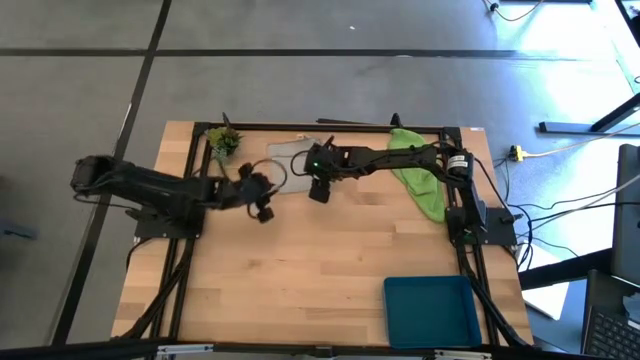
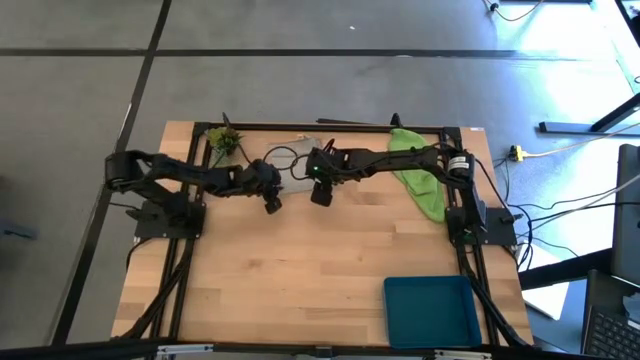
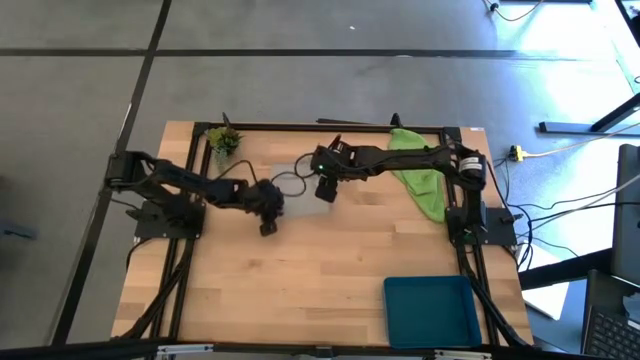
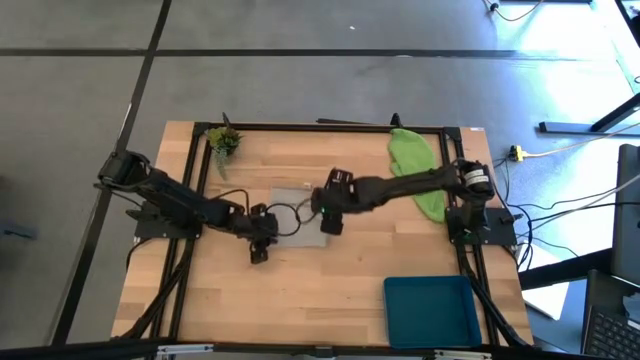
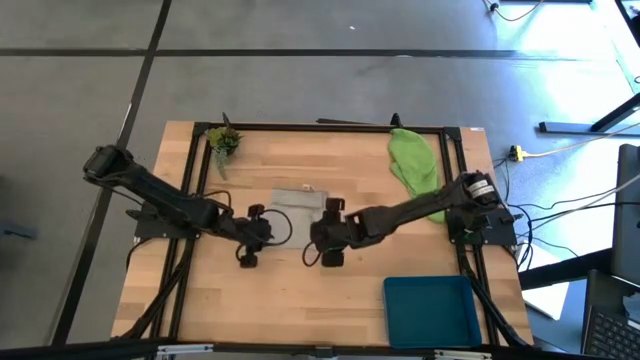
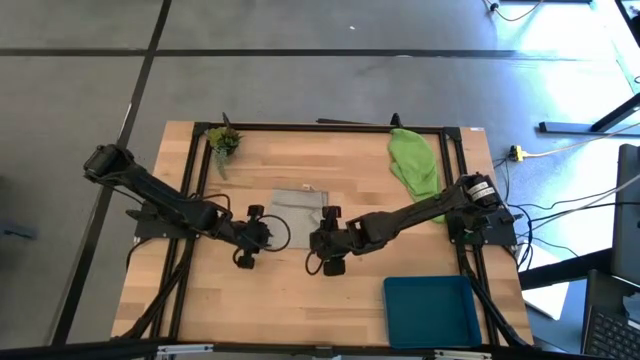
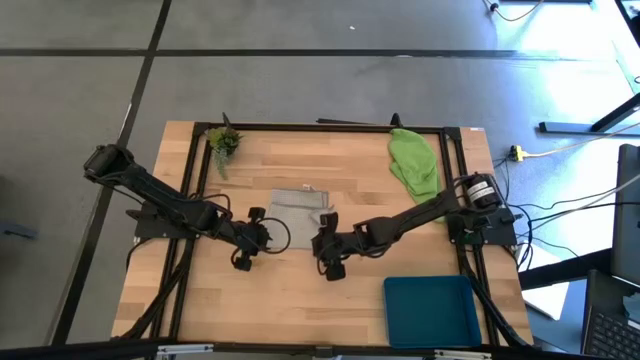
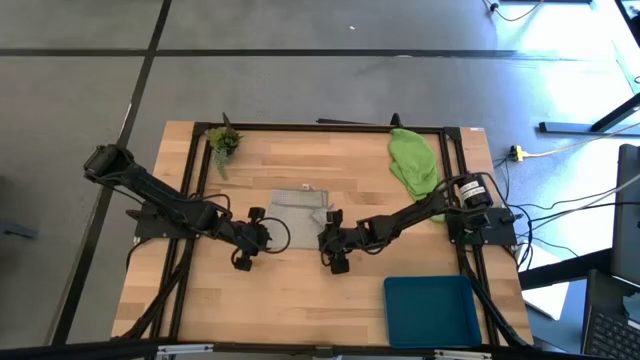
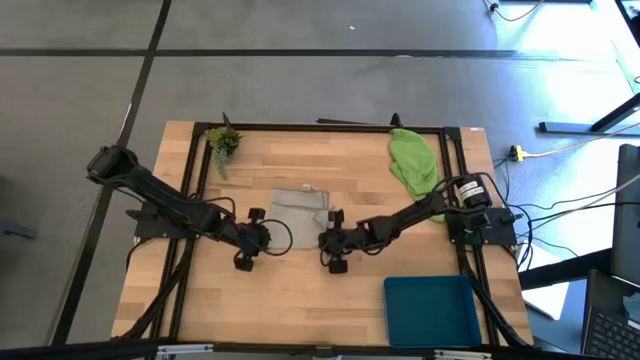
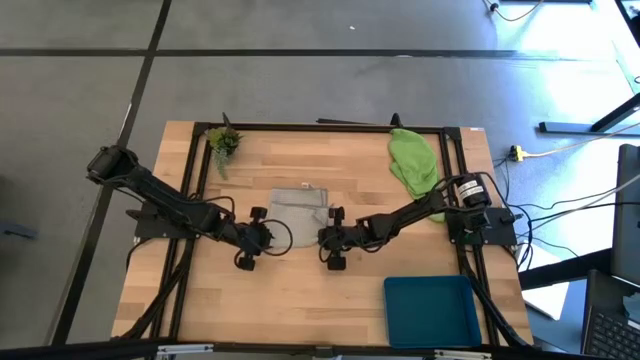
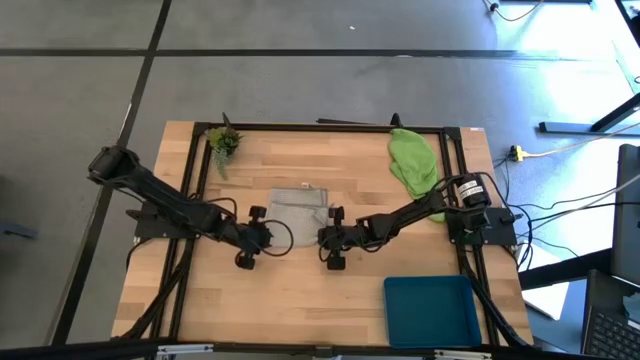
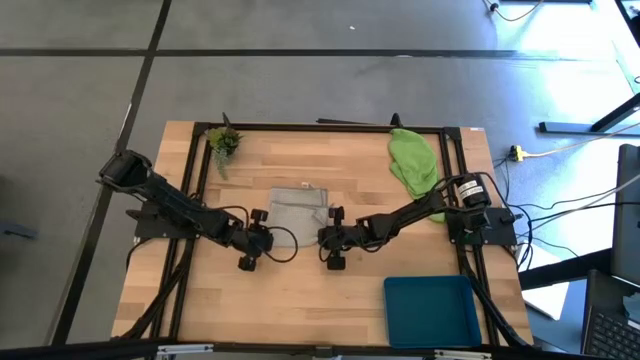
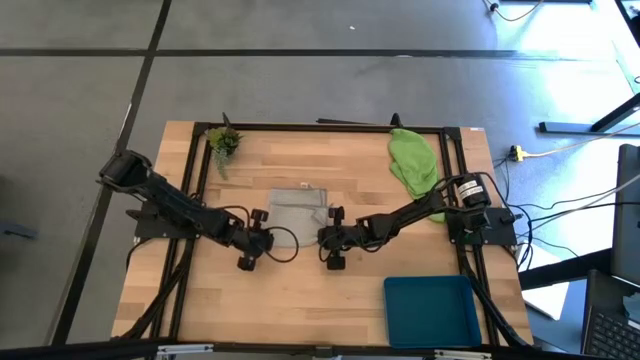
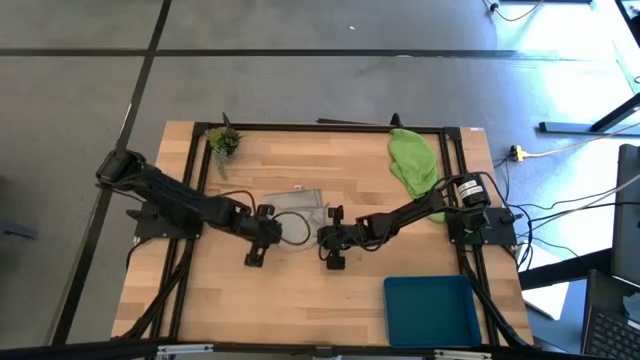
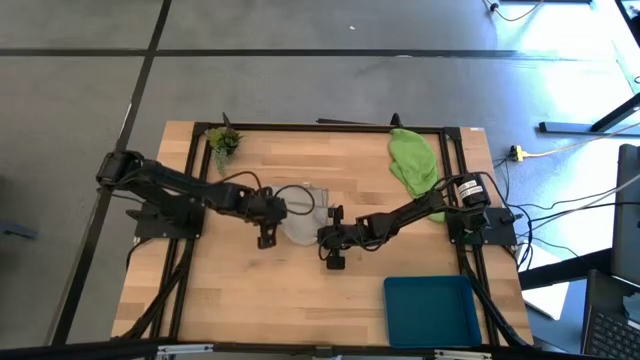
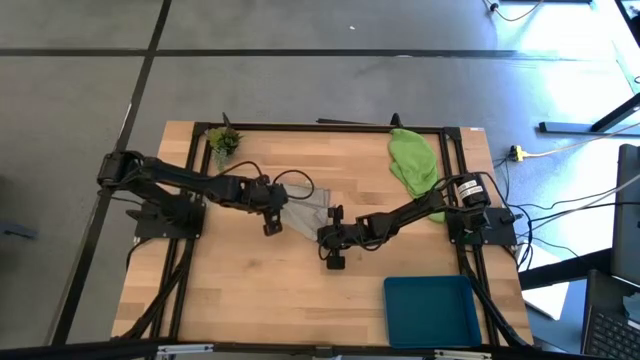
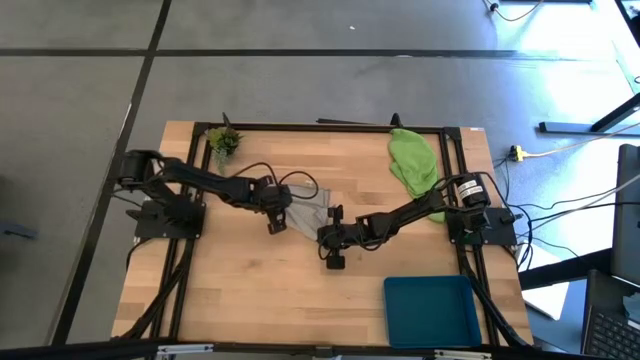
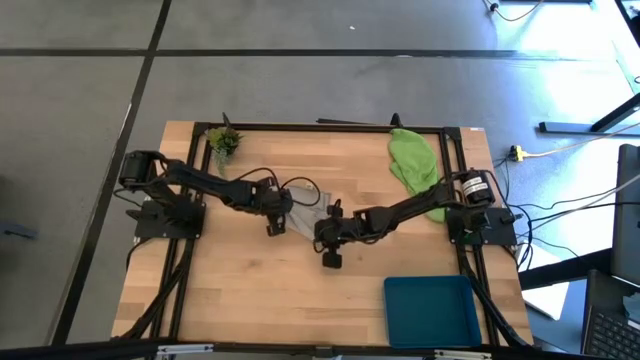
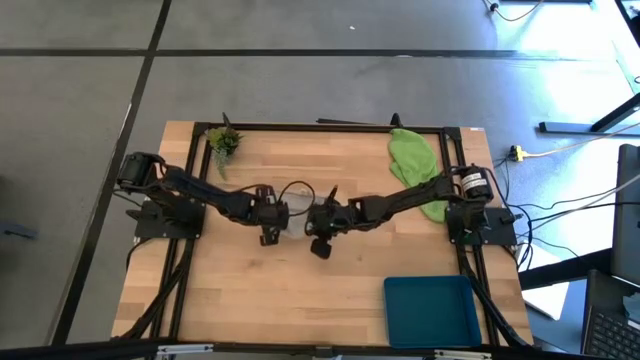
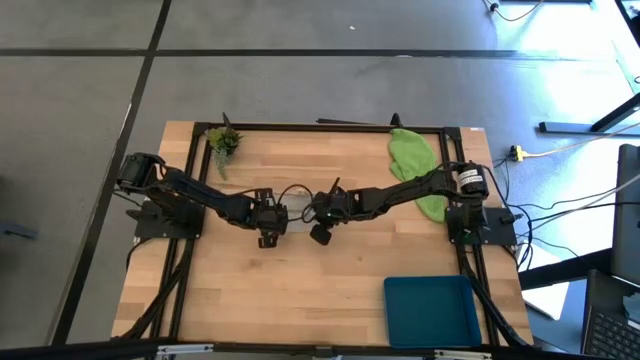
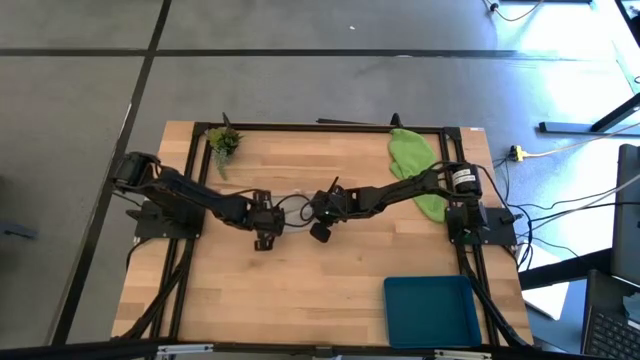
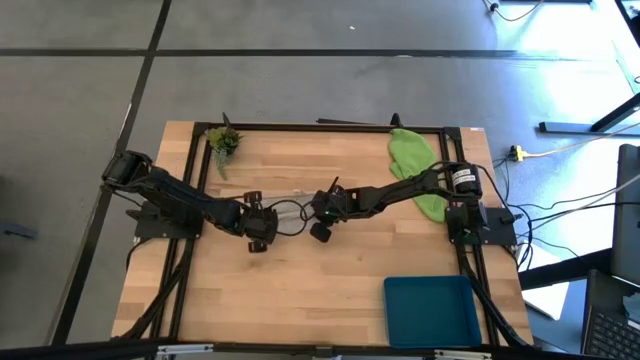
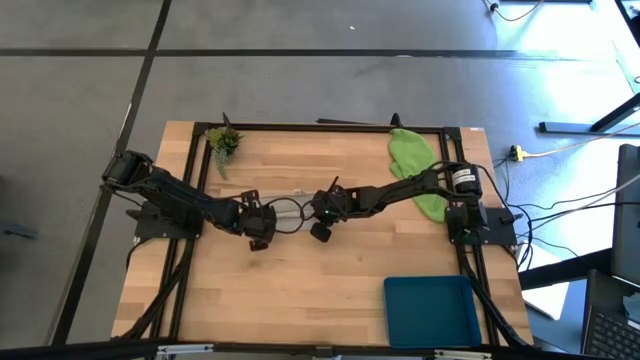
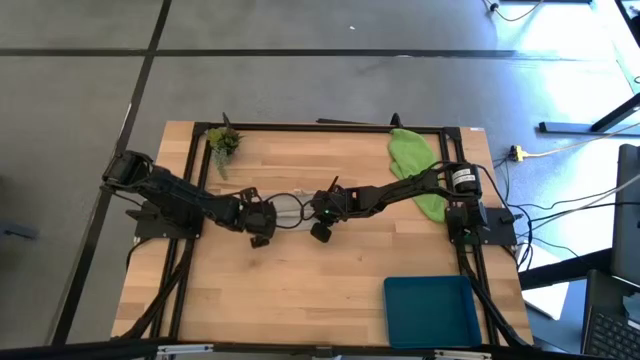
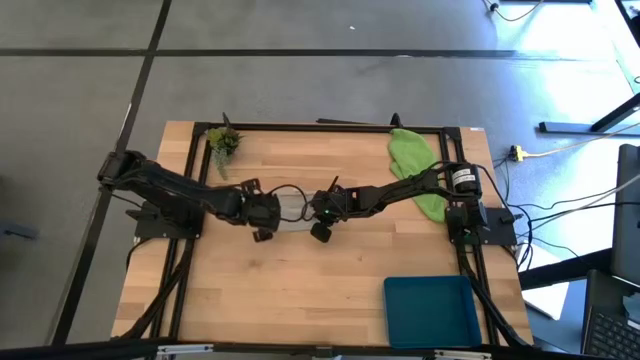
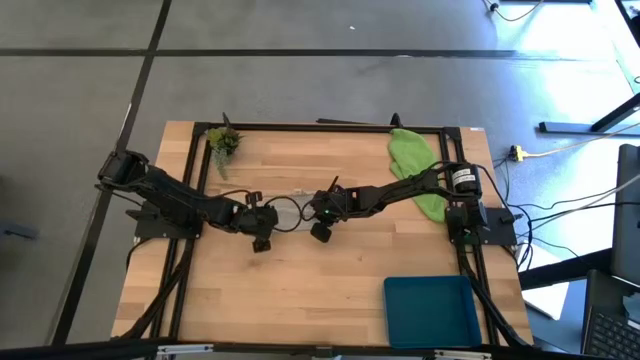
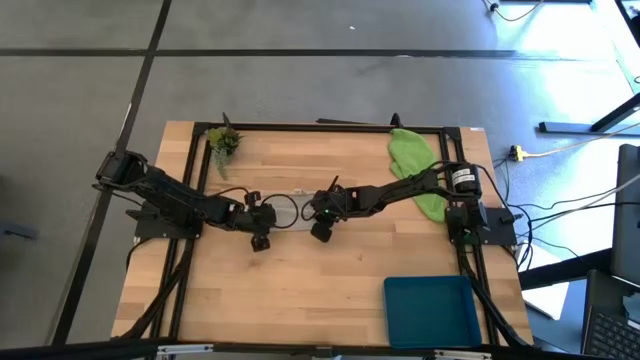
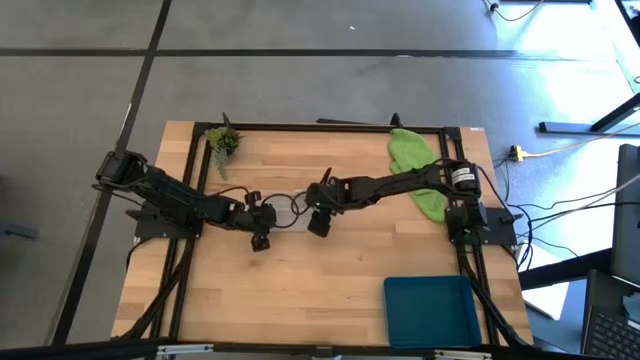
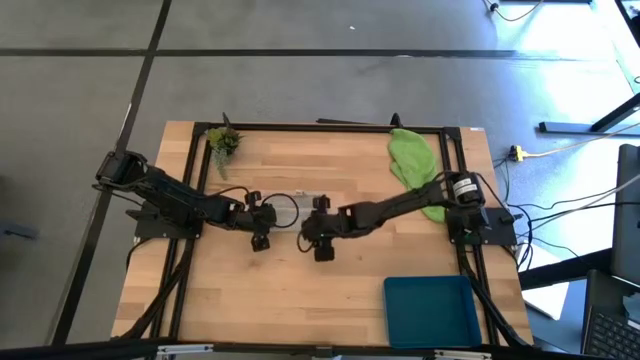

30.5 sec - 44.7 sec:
Task: Roll microfiber towels into tight, uniform cylinder then place into a basket
Roll the gray towel

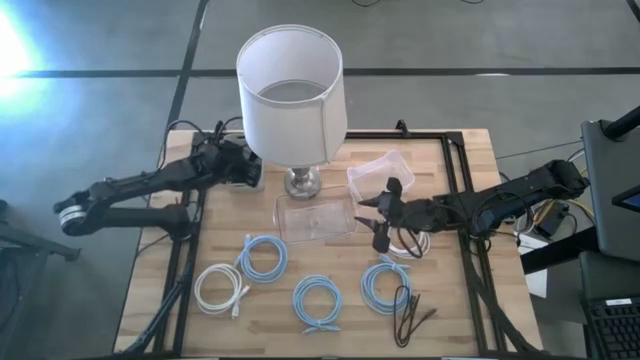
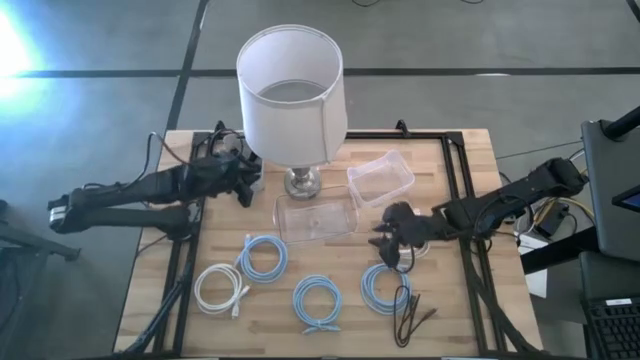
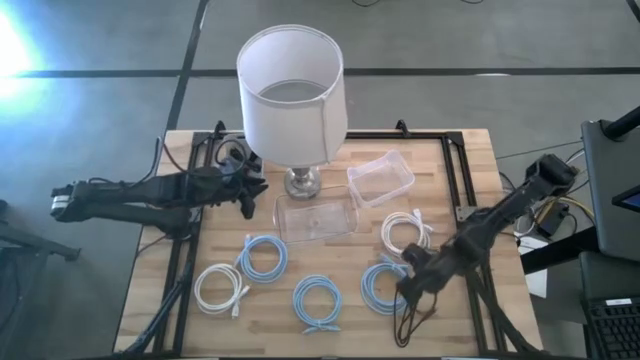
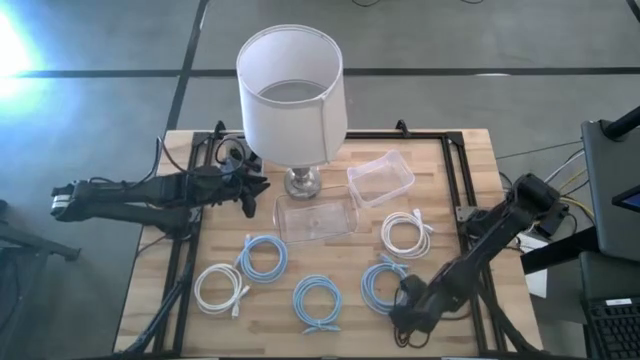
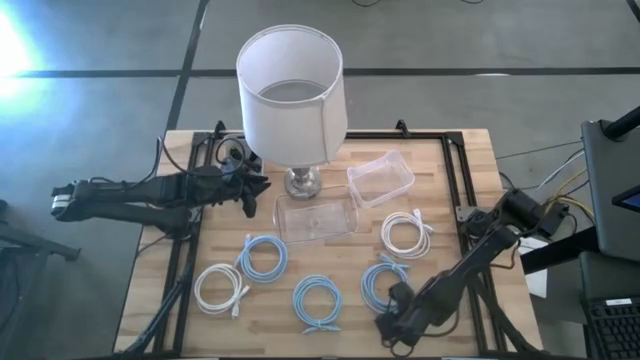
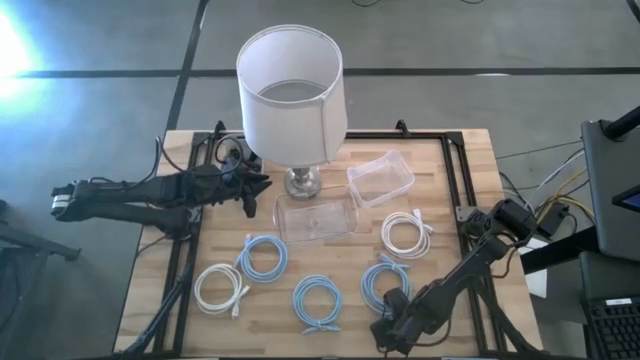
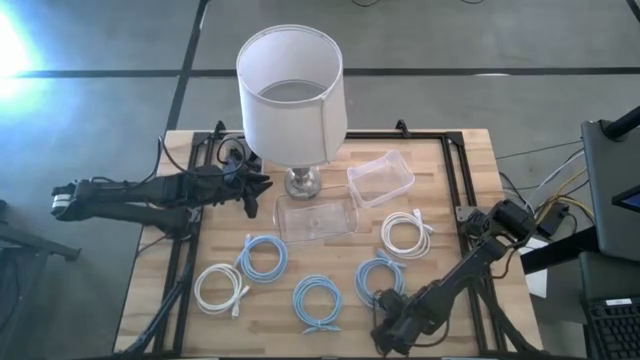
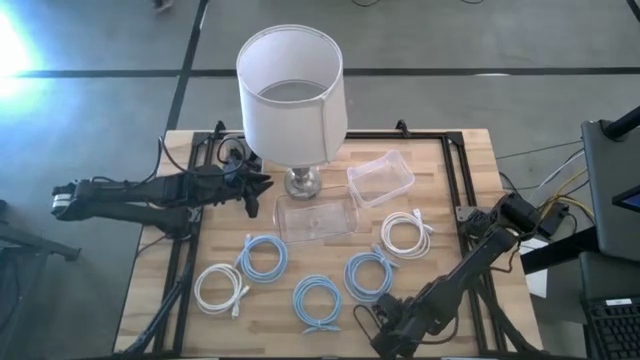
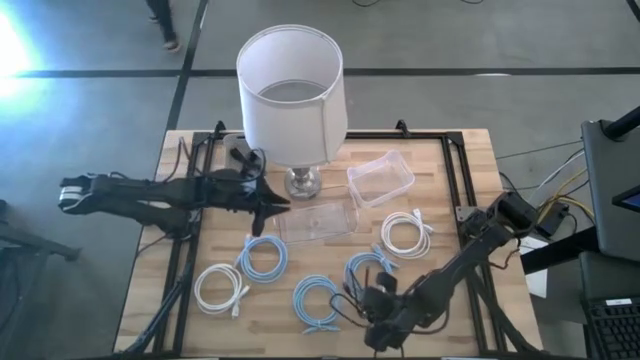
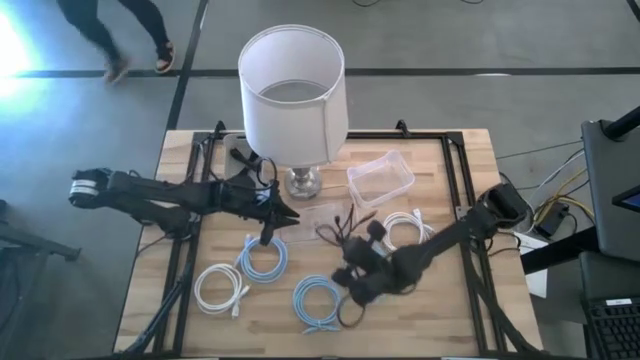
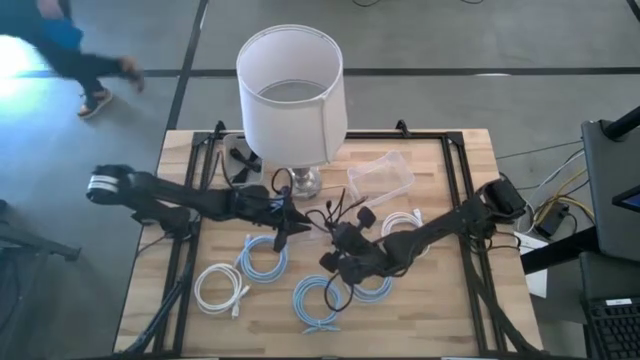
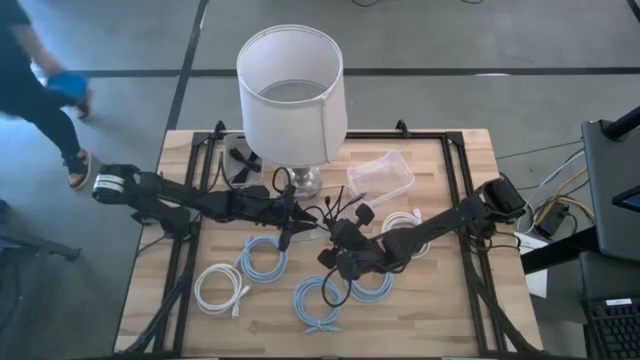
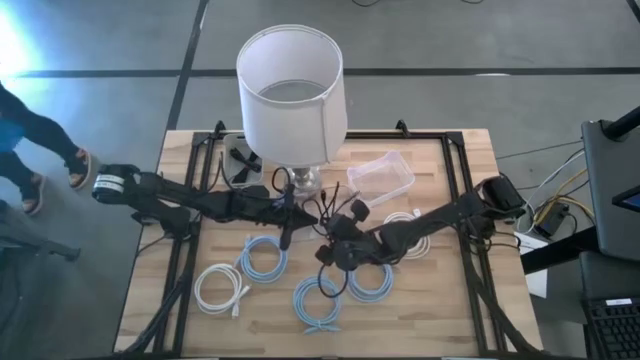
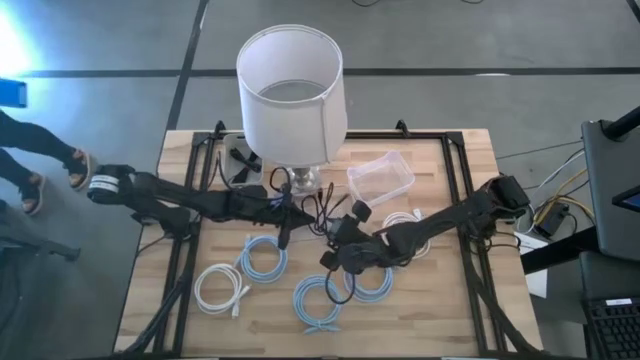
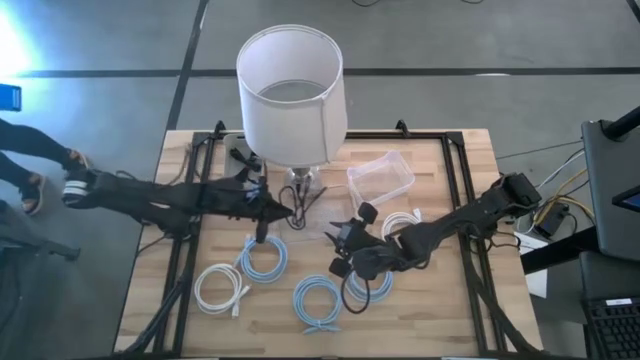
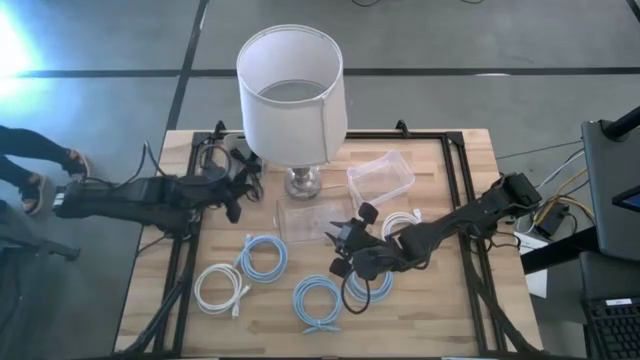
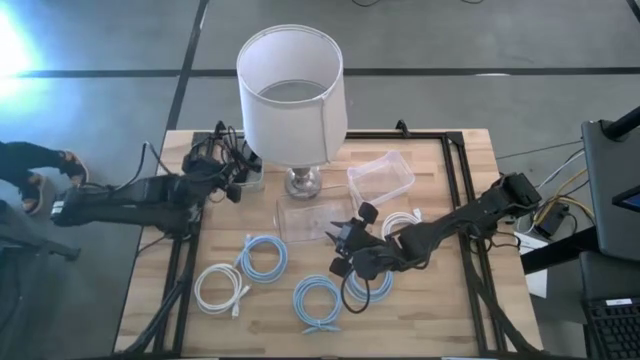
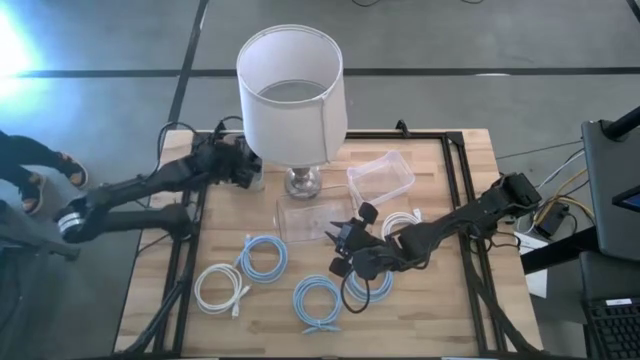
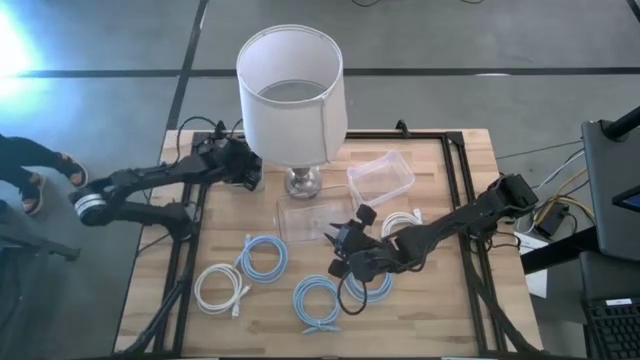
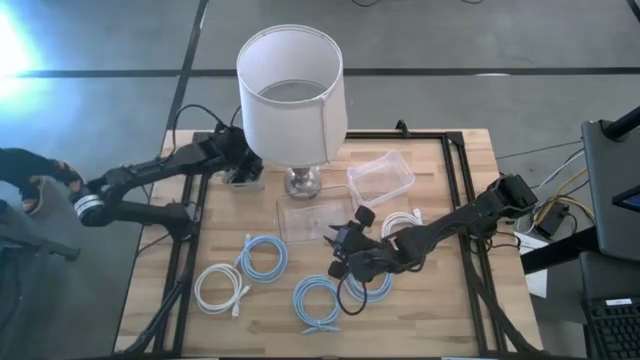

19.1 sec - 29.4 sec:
Task: Pick & Place USB Port
Put the black usb cable into the gray bin
